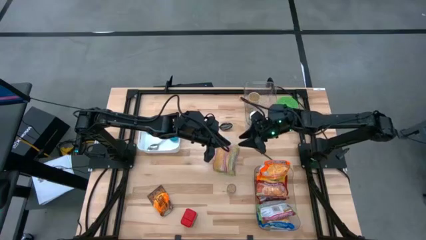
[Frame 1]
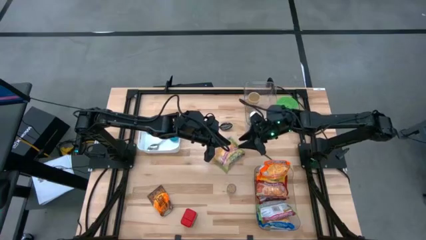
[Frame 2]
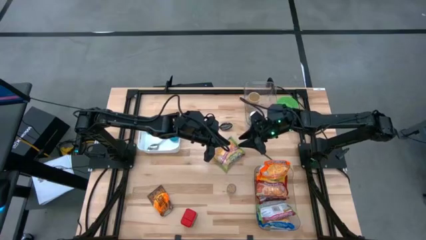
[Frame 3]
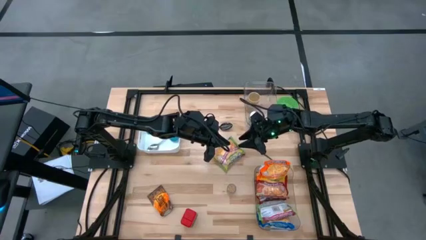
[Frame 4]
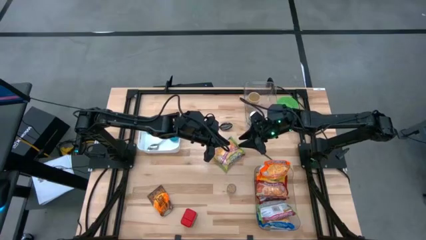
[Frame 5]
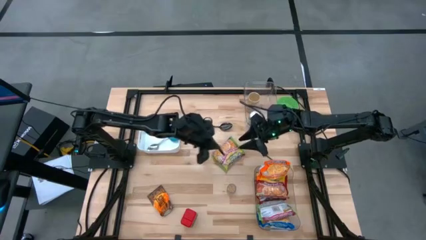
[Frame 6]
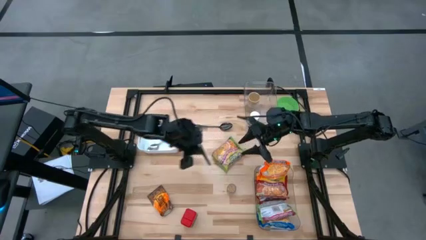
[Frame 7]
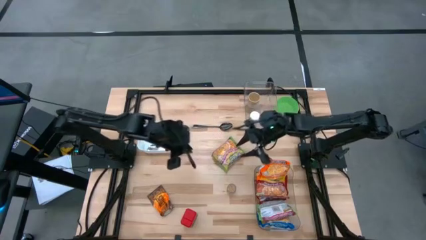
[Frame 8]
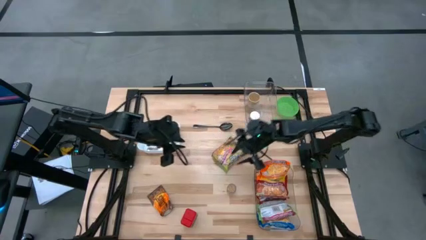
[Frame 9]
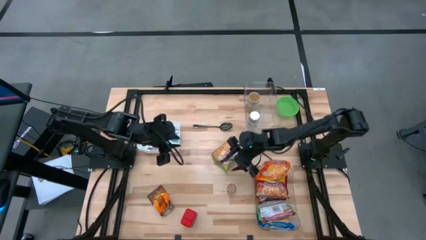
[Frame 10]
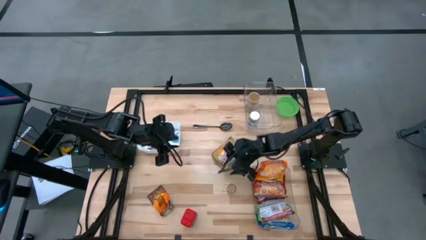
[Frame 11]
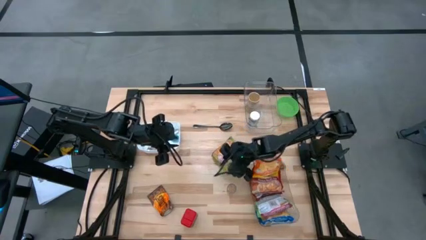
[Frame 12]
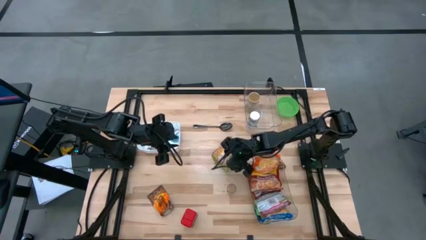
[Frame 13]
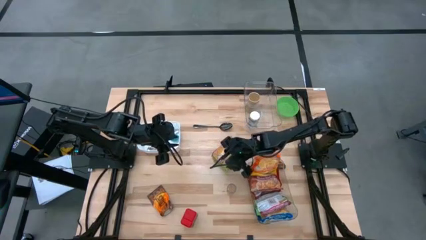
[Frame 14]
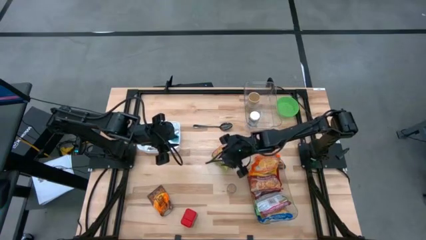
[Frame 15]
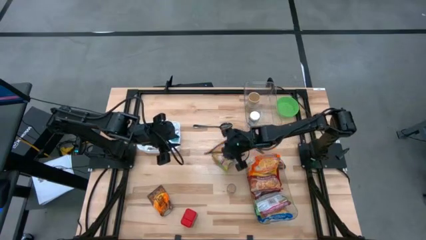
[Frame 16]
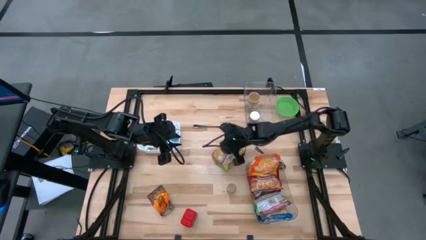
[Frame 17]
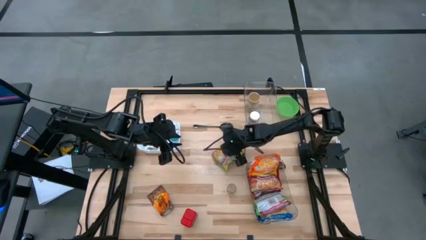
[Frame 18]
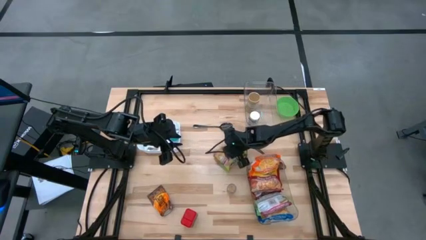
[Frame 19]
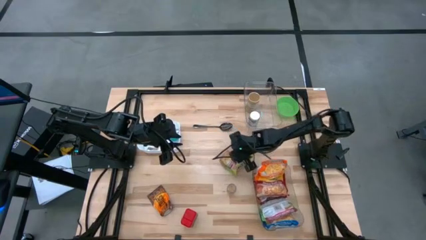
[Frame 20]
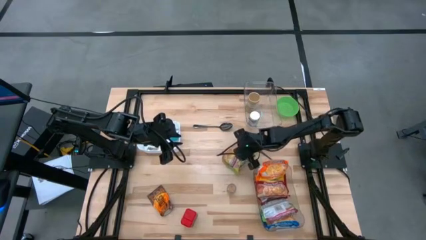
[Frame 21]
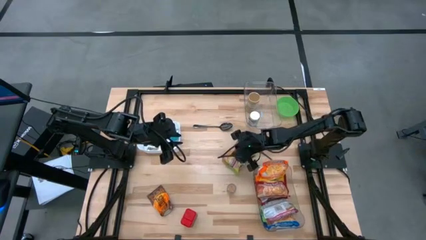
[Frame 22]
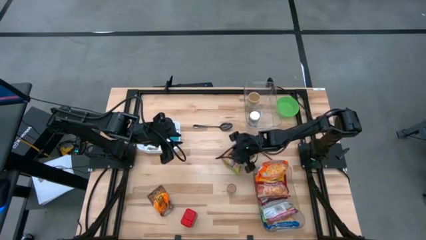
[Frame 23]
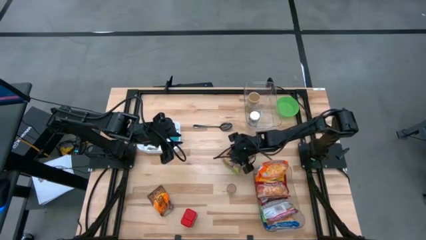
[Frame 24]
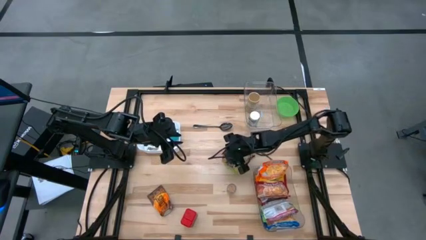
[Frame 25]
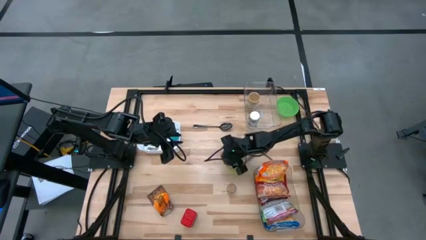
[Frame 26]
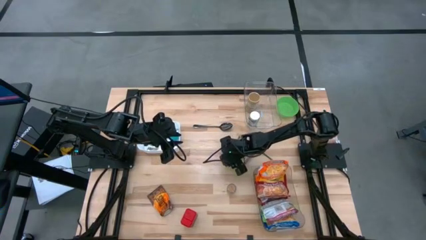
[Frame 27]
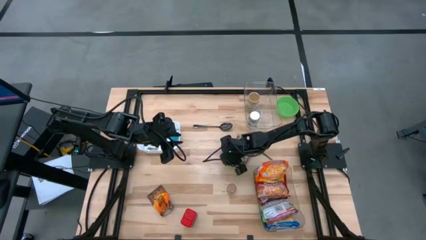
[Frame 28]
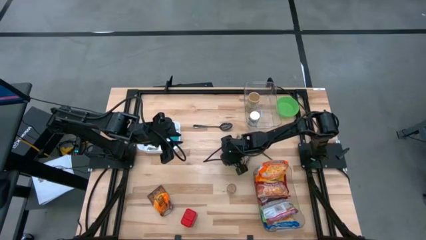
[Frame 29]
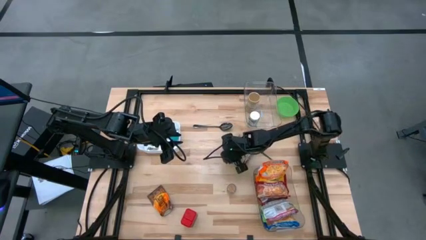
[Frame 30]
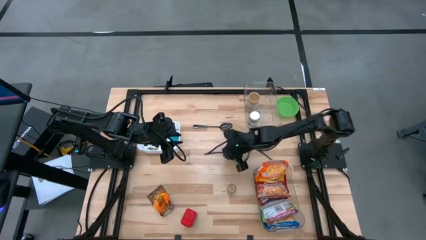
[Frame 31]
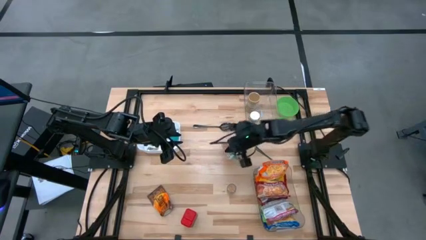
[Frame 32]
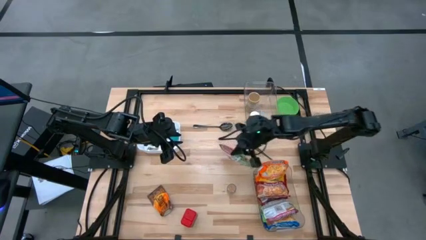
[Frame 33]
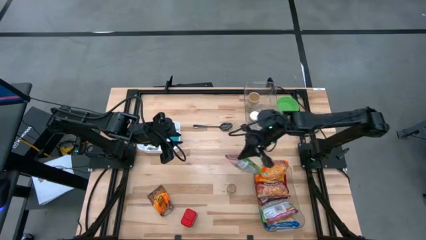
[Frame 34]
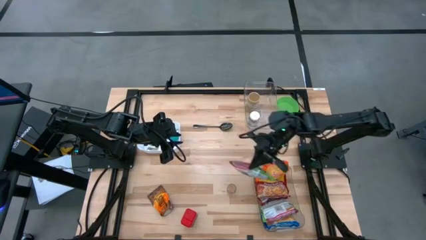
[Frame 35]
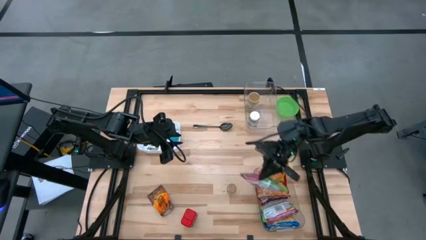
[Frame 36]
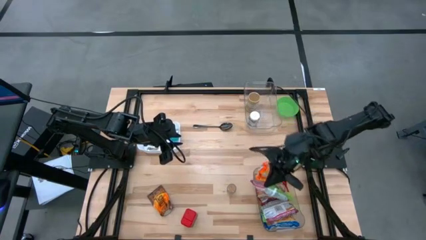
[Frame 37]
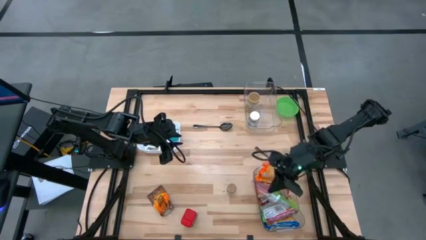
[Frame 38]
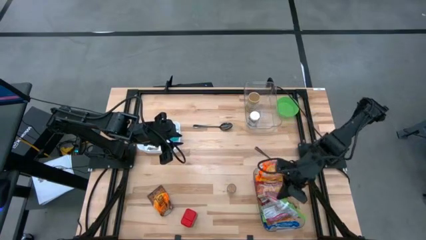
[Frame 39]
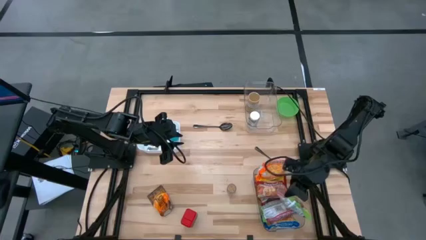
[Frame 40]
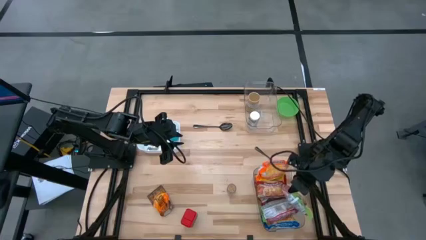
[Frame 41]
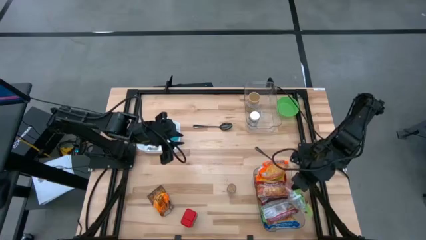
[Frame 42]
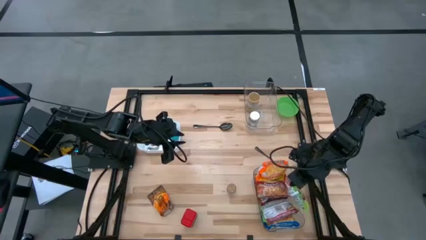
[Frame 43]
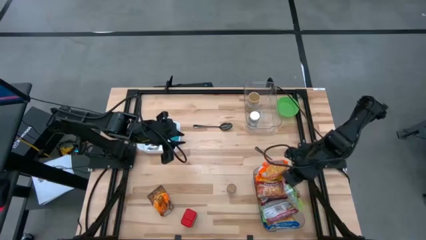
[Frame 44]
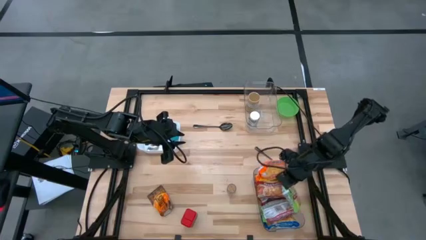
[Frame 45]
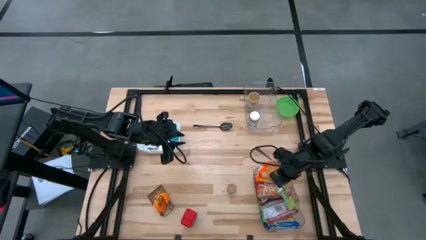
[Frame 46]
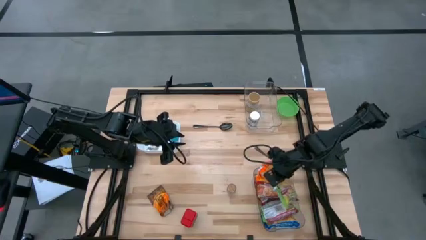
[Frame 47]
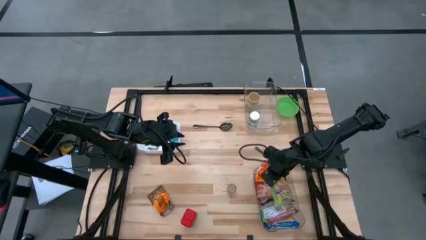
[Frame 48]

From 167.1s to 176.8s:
Task: Pick & Place Food Item
Put the green noodle pack into the bottom transparent bin

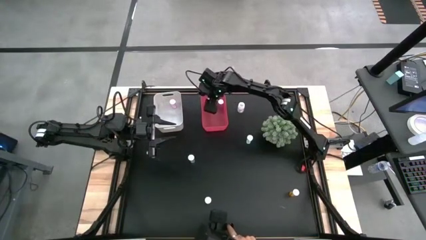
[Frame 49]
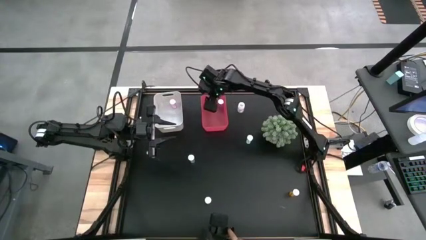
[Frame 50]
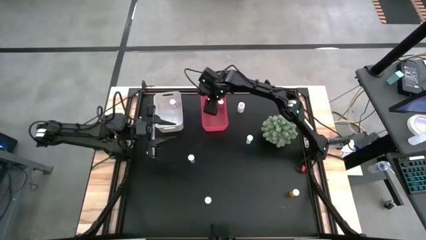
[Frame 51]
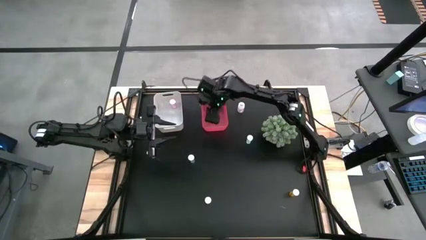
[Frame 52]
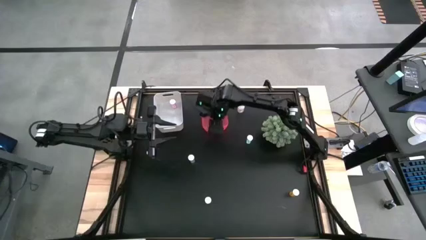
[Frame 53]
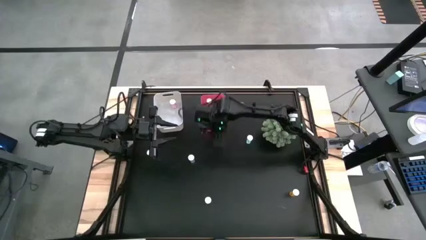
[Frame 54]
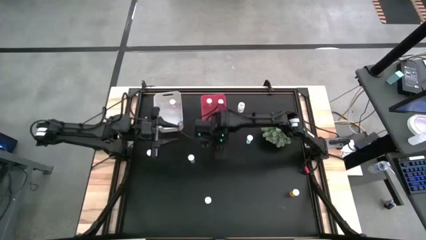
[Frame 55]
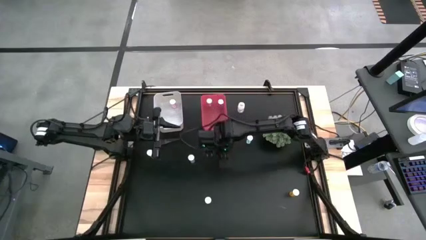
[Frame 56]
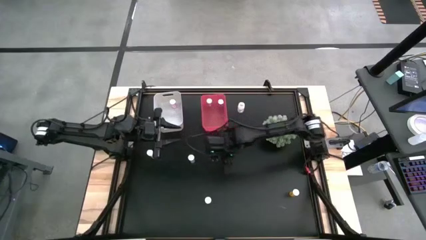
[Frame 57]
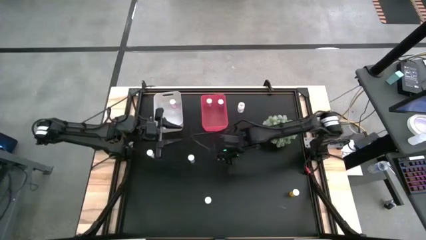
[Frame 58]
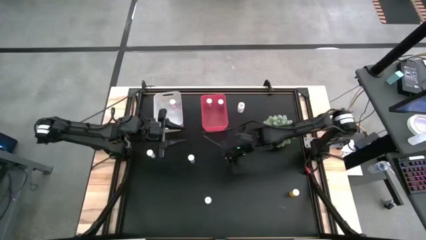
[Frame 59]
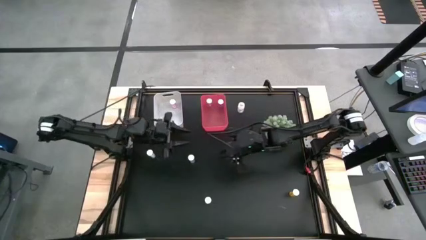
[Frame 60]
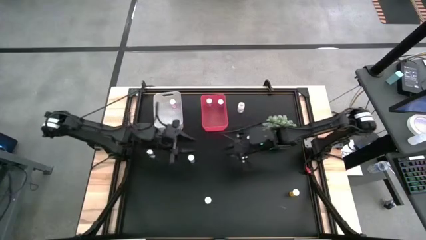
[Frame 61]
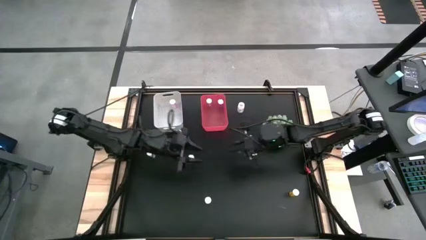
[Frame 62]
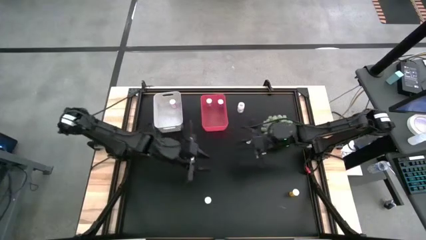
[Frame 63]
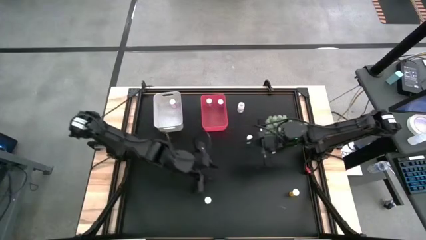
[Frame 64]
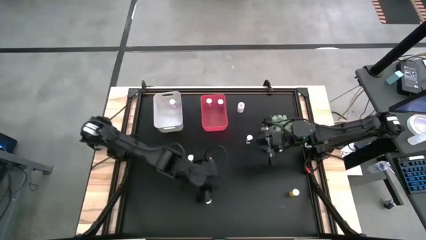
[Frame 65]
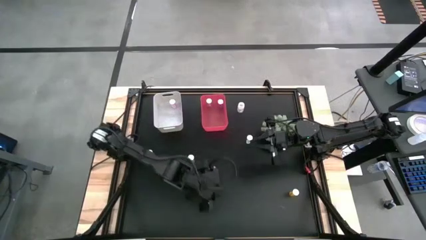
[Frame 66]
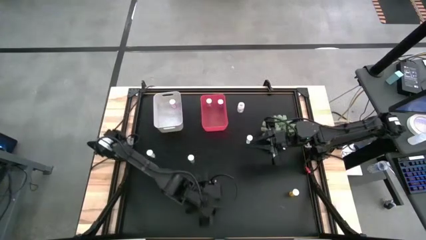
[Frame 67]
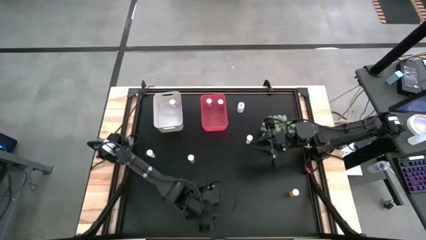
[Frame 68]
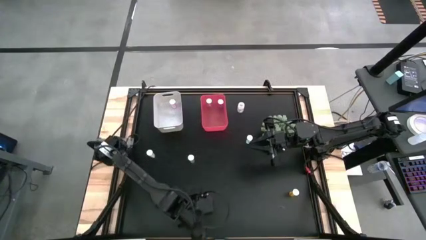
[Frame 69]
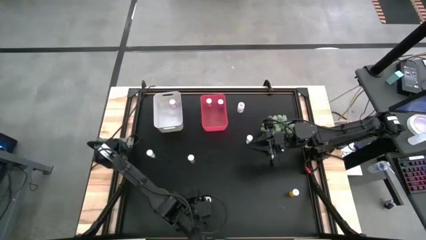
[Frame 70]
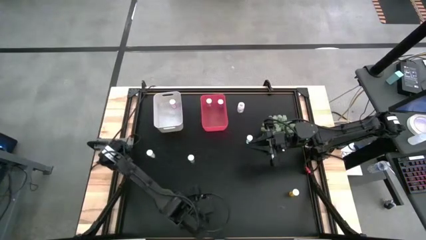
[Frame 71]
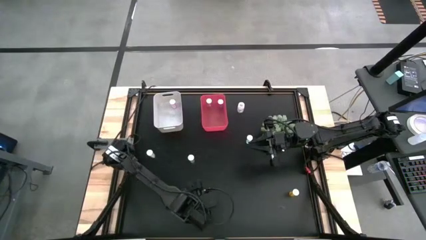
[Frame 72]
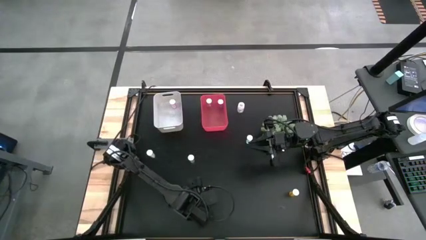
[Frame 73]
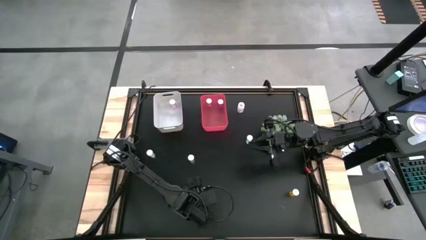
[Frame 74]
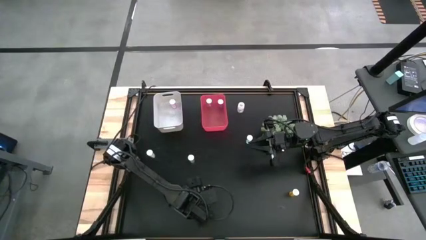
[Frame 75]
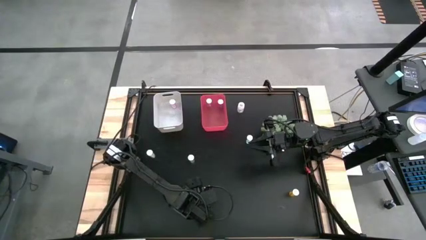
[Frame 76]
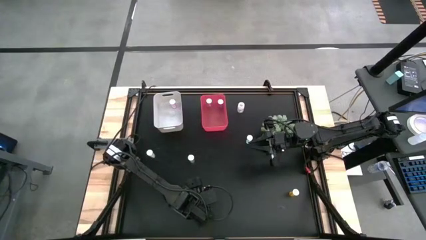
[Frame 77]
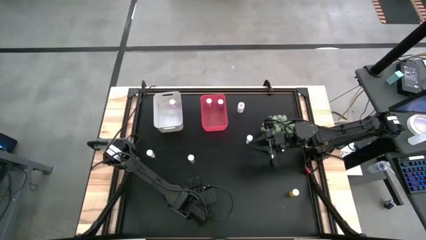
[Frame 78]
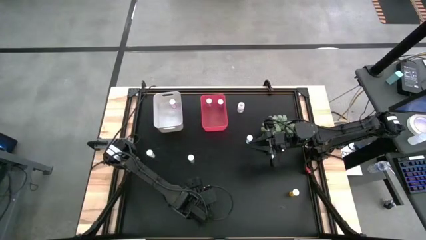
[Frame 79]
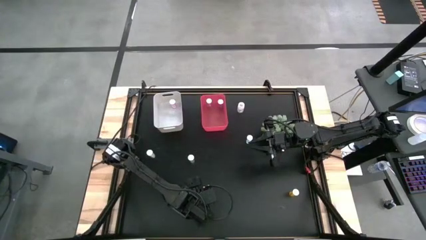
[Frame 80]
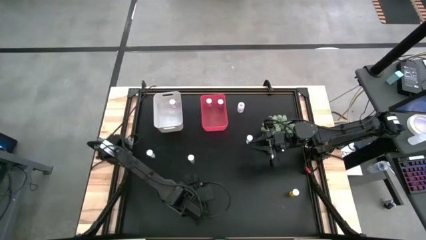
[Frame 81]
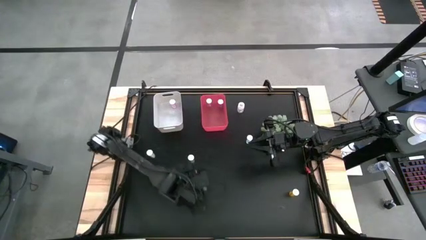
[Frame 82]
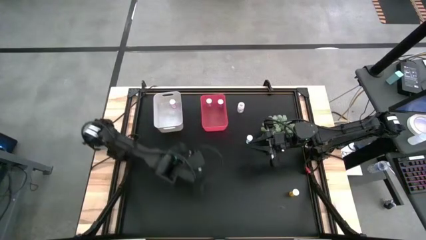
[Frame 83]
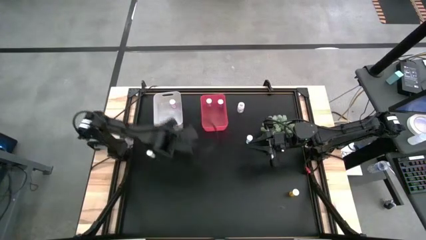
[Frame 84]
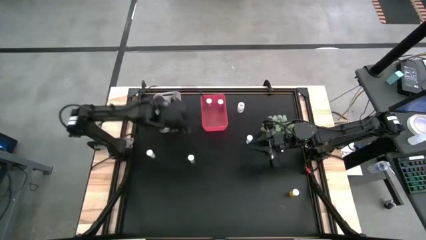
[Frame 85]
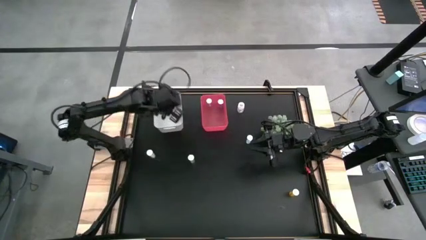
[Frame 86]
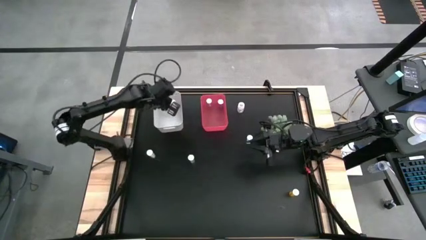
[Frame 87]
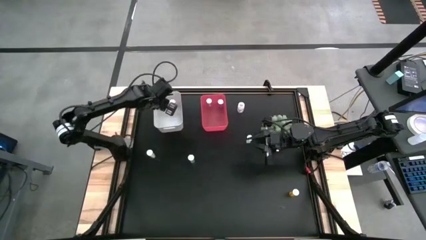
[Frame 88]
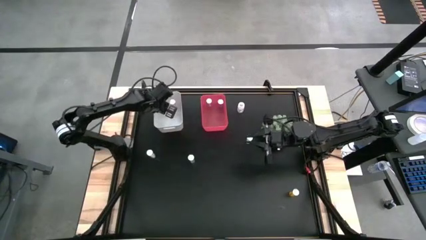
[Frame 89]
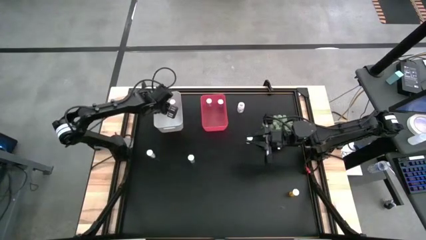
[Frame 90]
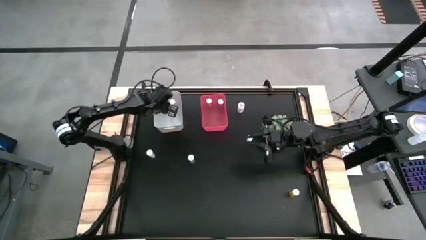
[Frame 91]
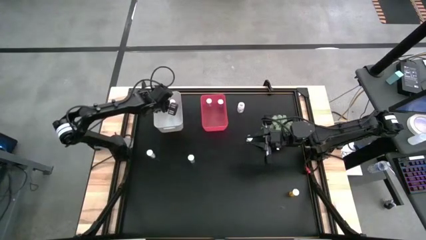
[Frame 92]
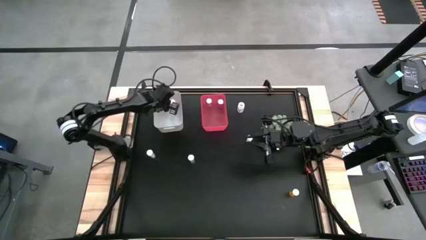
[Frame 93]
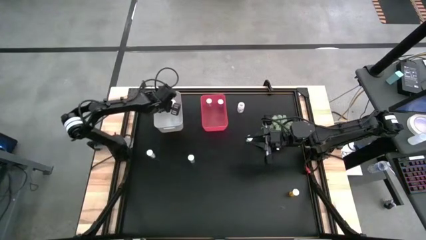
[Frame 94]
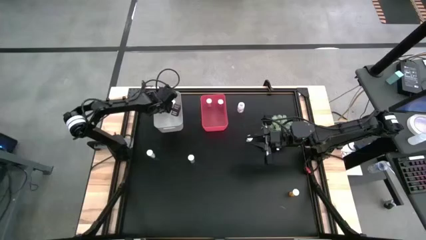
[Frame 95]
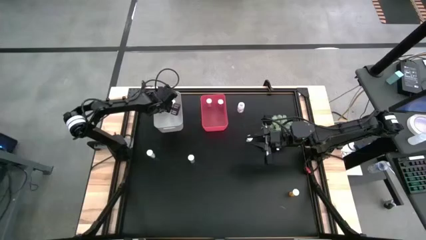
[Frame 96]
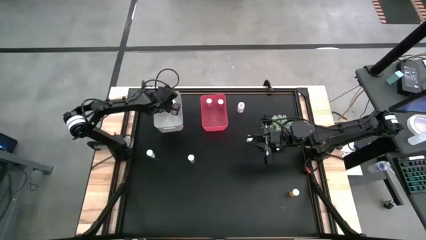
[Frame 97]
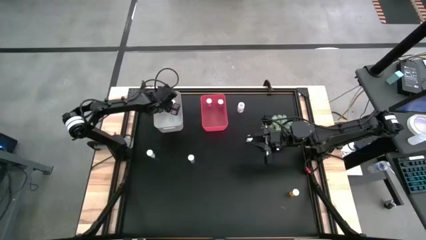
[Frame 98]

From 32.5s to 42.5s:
Task: Pick and place medicine bottles into bin by pill shape (circle, oval)
Put the blue tablet bottle into the white bin
